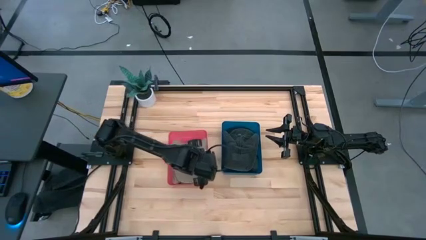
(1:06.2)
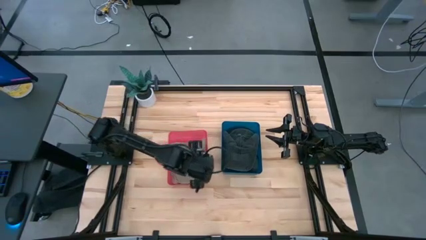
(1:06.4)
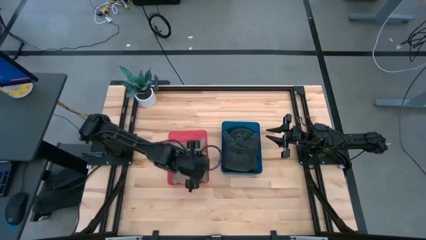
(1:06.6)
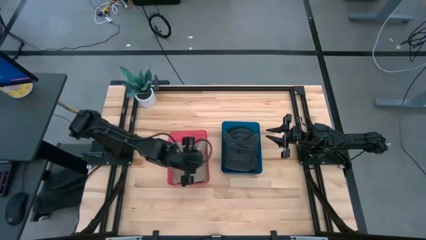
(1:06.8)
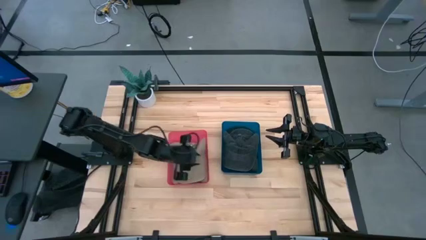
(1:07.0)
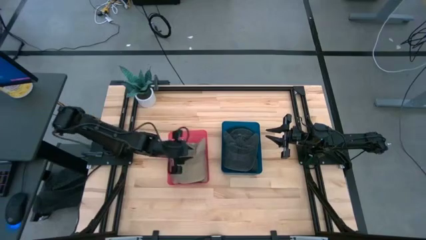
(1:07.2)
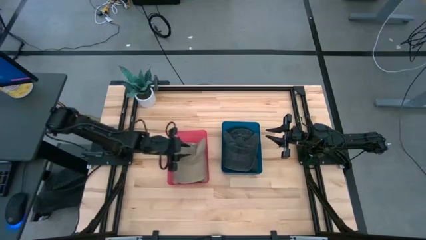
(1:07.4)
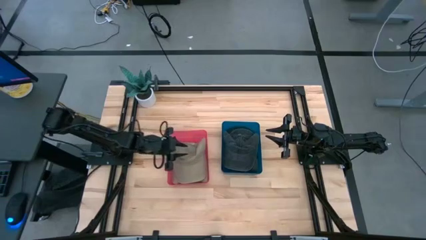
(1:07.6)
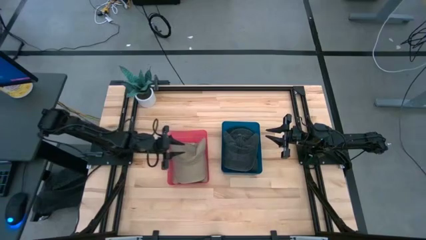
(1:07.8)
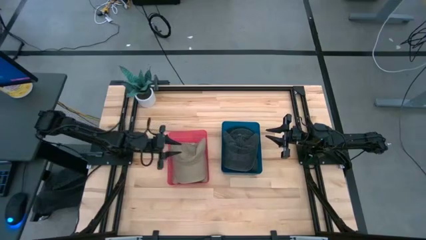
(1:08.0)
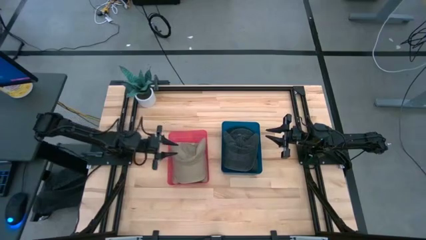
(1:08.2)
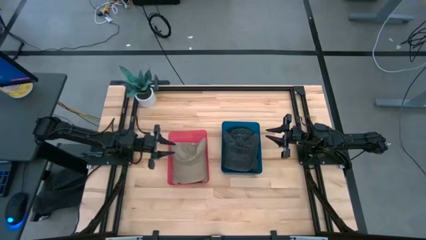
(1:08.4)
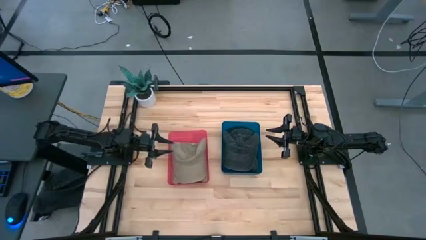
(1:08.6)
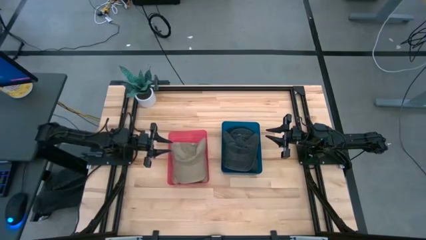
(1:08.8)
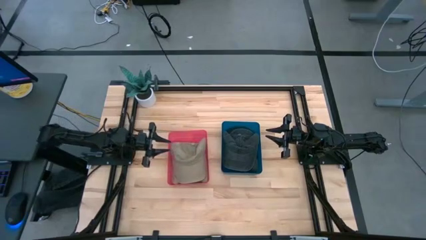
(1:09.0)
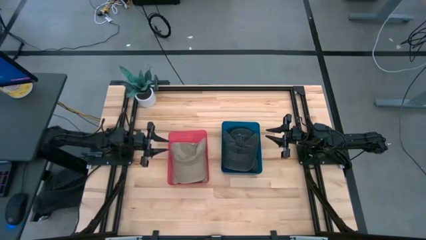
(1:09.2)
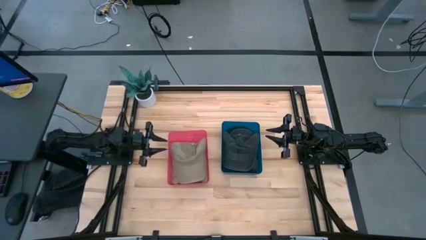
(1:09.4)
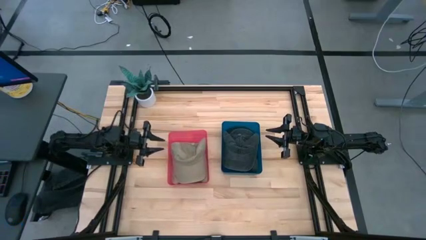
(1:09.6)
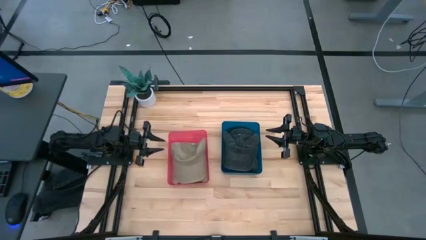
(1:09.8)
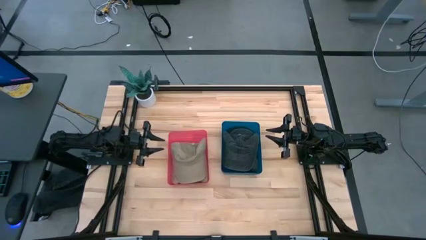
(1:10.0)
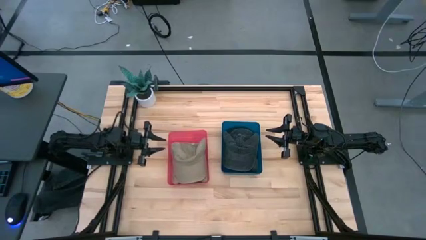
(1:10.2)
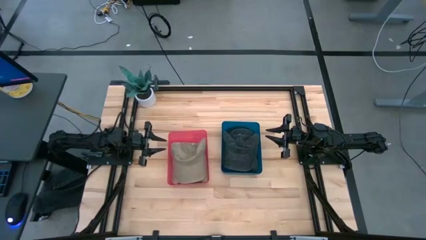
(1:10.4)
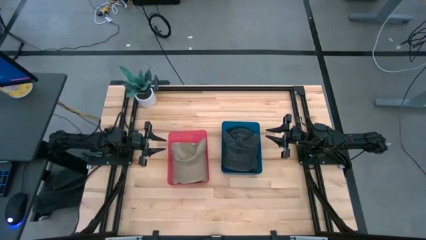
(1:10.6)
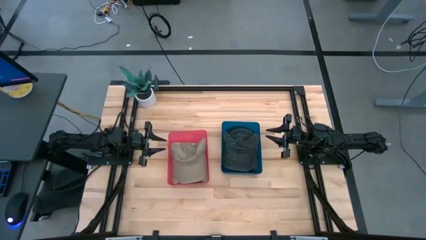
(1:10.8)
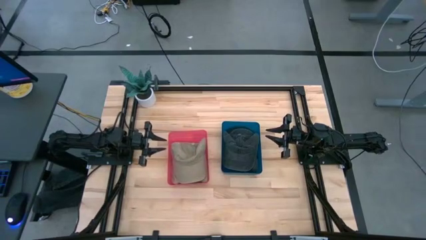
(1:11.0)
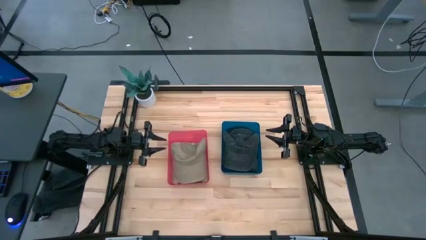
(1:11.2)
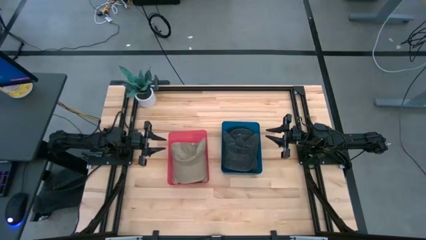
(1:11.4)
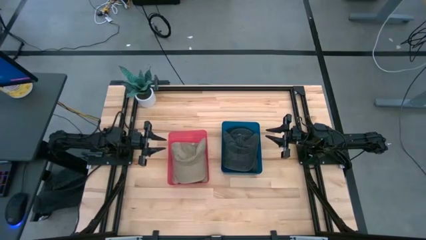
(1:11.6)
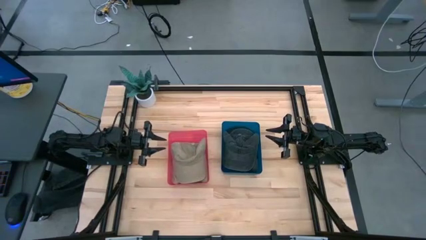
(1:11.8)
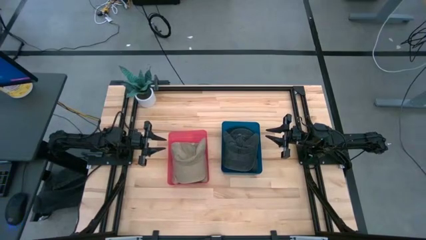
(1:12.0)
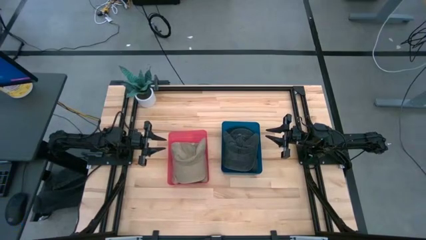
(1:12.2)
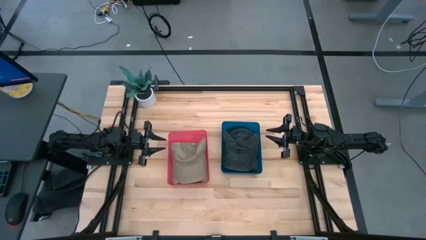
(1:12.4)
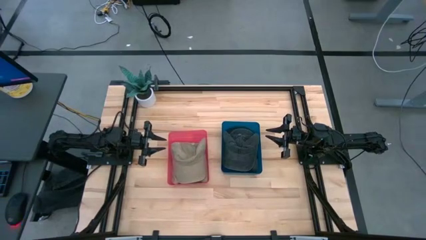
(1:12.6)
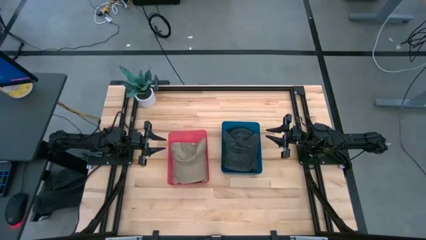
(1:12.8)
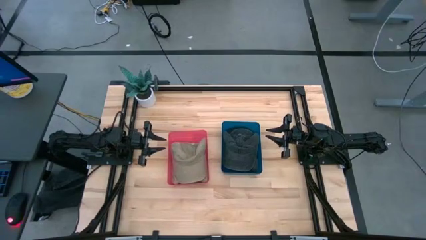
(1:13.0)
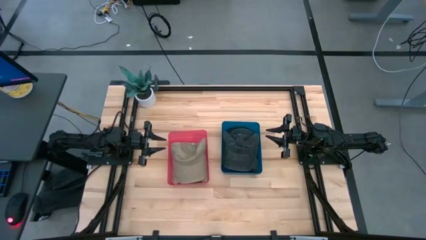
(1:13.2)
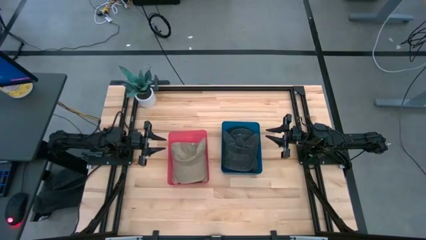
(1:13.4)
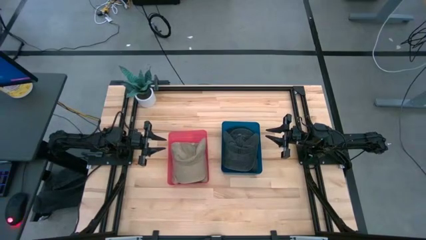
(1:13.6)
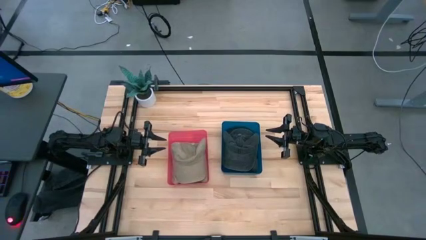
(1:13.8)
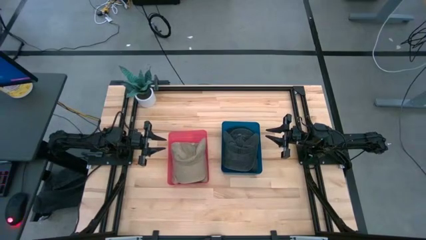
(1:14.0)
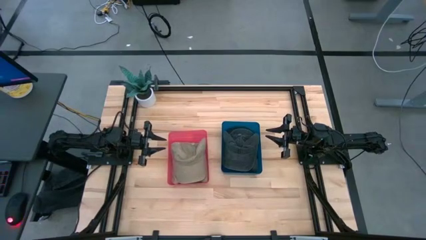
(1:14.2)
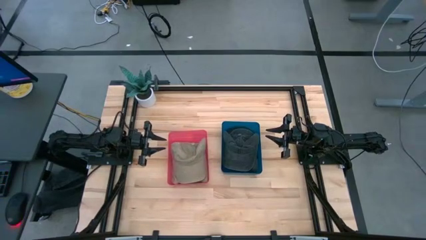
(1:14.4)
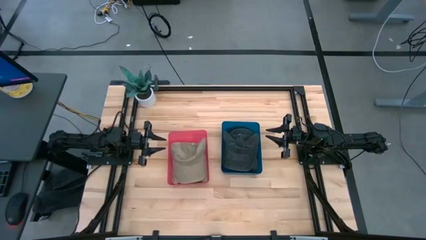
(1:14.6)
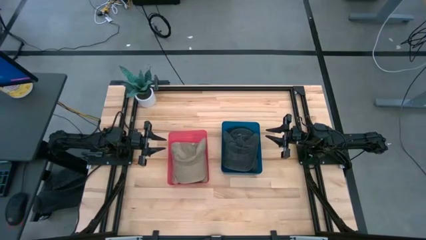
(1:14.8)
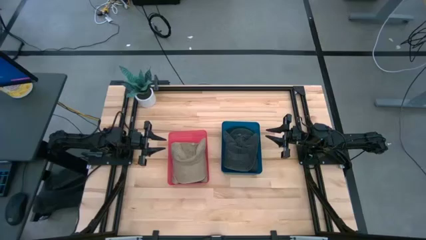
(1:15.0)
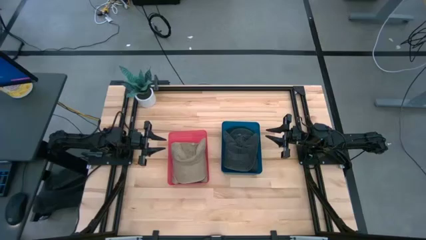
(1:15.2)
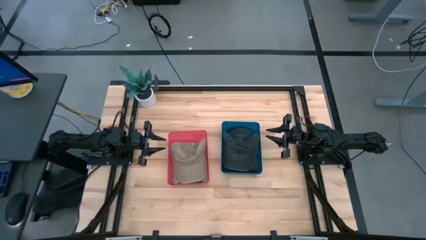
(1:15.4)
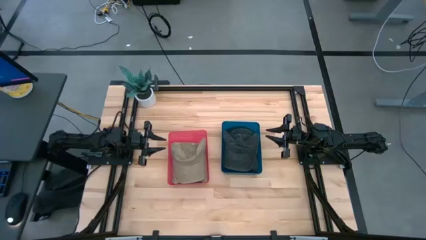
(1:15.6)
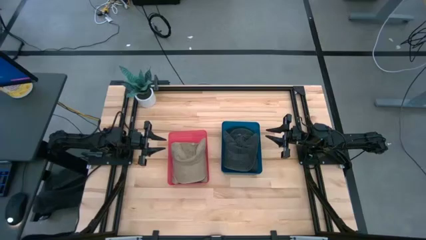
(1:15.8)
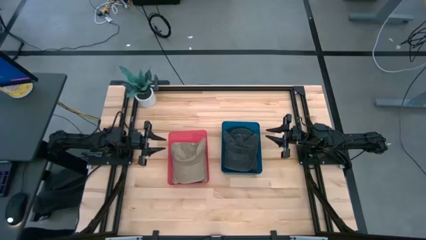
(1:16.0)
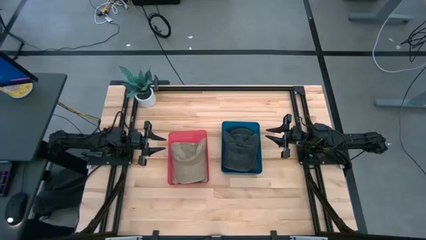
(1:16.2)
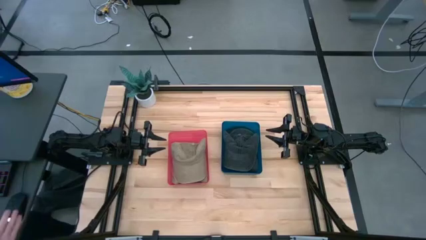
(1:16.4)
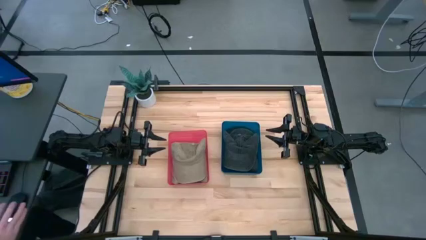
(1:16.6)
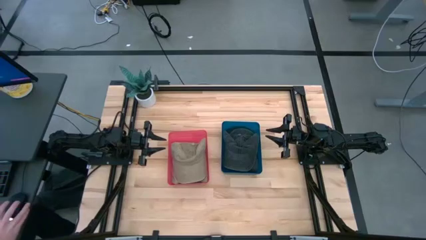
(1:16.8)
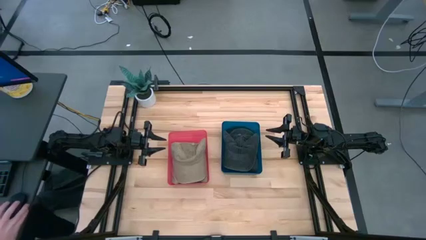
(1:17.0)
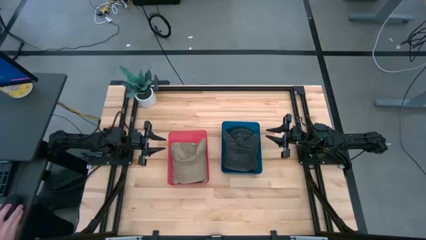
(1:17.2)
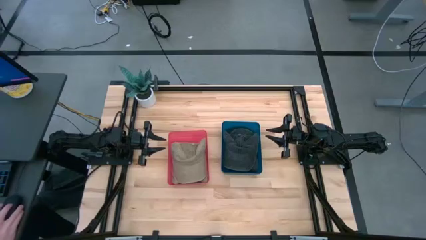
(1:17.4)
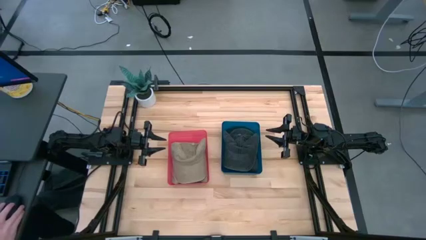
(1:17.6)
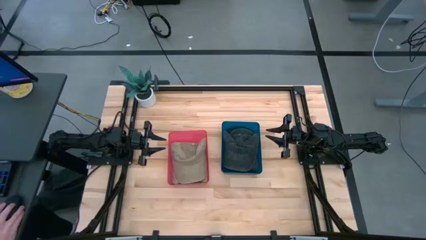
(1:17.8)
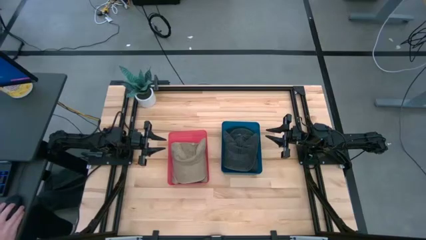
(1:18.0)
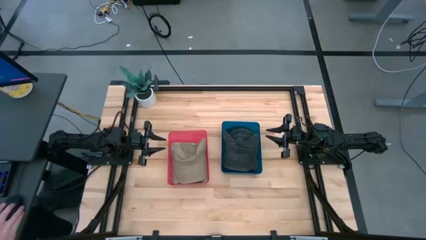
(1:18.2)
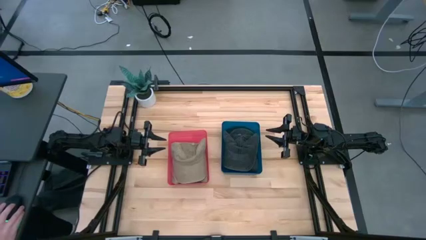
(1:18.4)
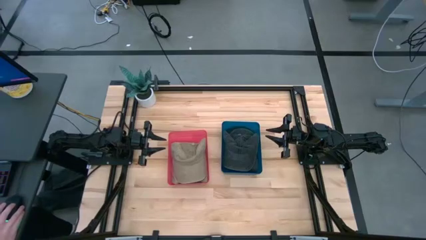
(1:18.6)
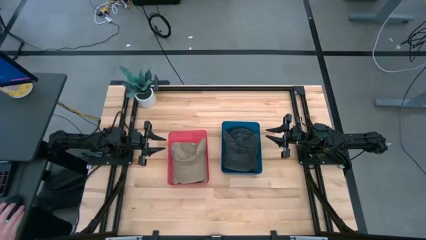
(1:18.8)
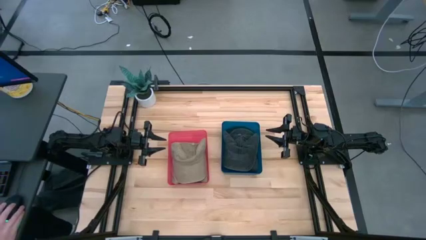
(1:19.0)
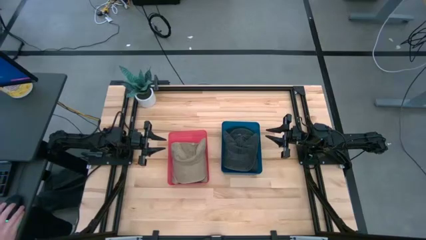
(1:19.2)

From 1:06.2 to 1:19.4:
Task: Pick & Place hat
Return to Home Position

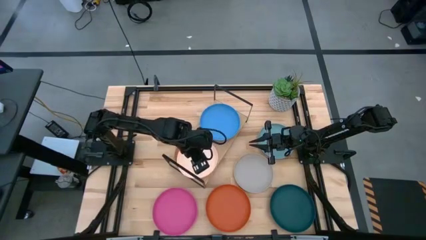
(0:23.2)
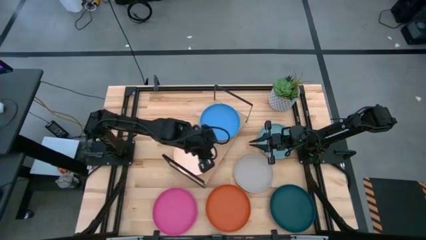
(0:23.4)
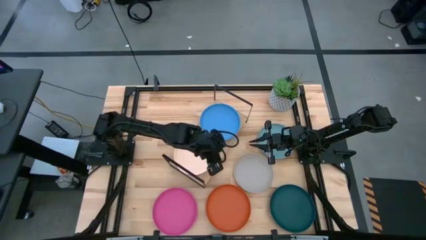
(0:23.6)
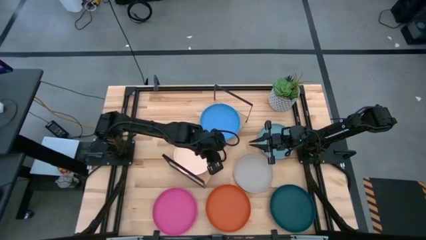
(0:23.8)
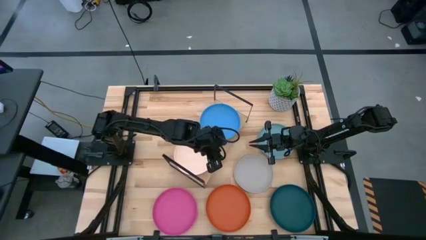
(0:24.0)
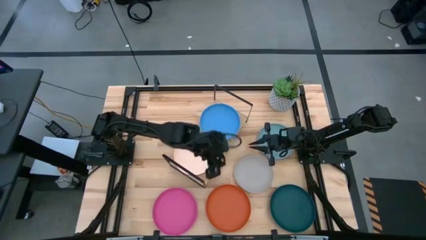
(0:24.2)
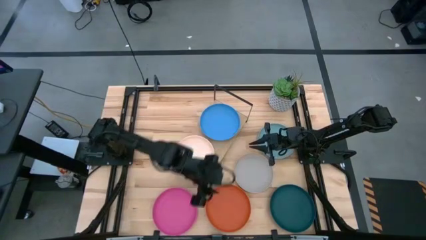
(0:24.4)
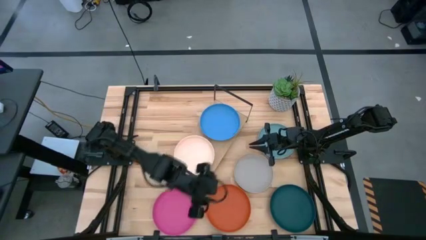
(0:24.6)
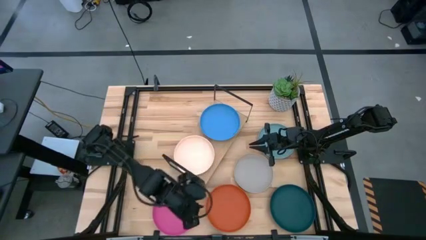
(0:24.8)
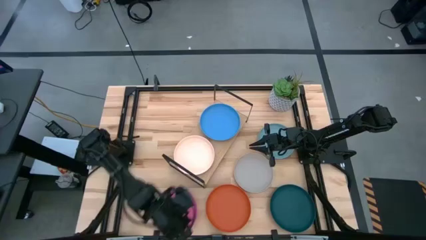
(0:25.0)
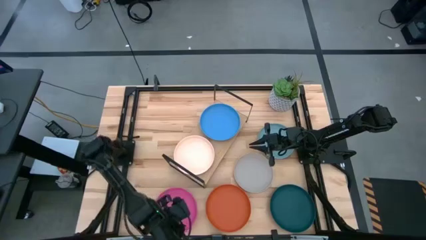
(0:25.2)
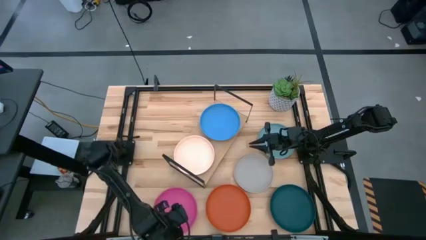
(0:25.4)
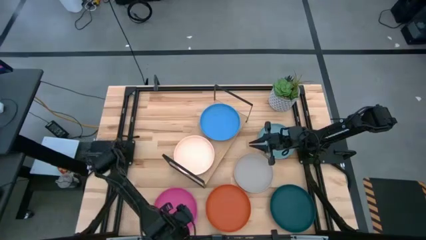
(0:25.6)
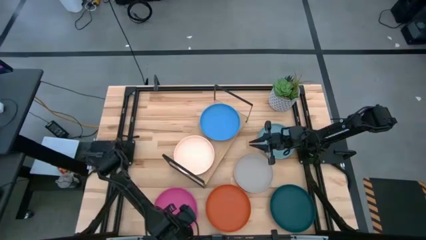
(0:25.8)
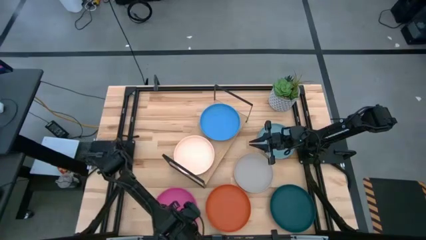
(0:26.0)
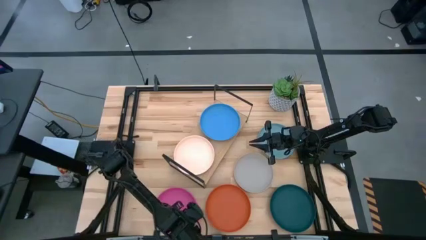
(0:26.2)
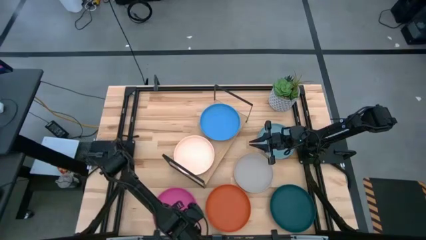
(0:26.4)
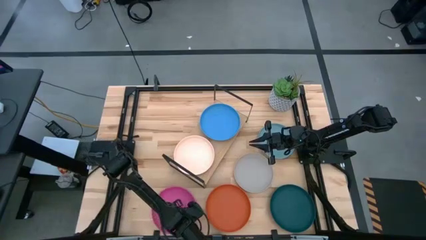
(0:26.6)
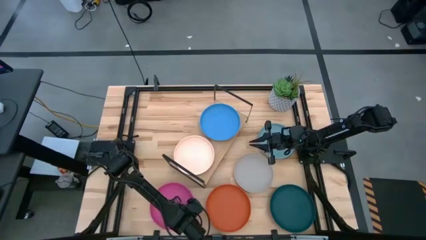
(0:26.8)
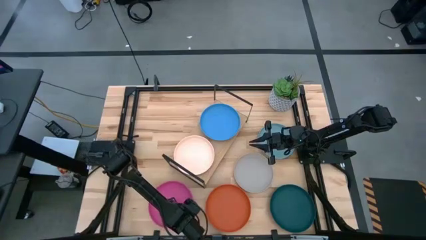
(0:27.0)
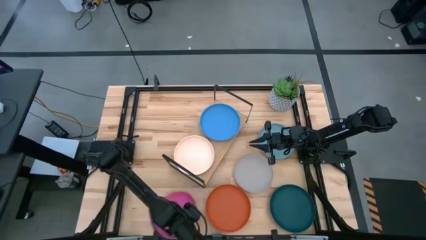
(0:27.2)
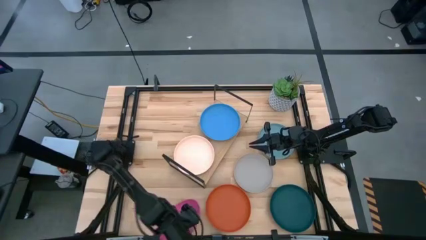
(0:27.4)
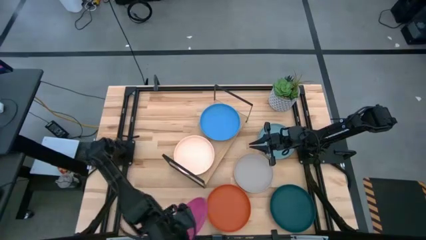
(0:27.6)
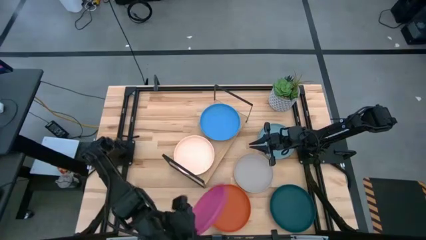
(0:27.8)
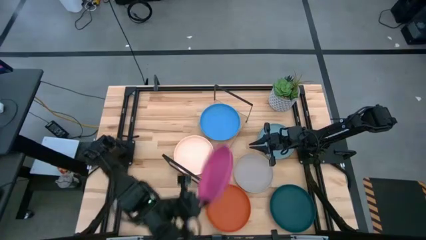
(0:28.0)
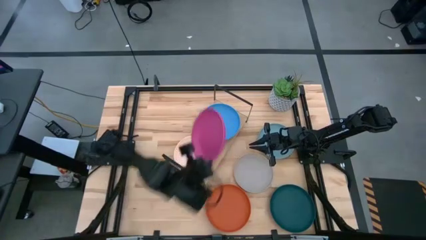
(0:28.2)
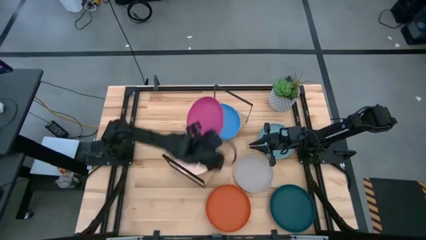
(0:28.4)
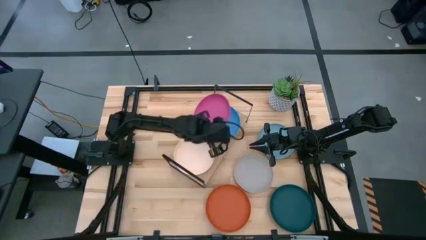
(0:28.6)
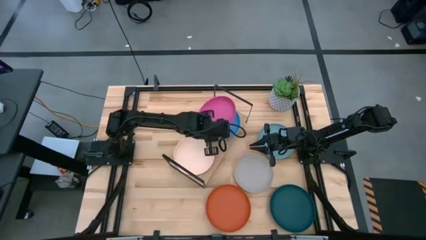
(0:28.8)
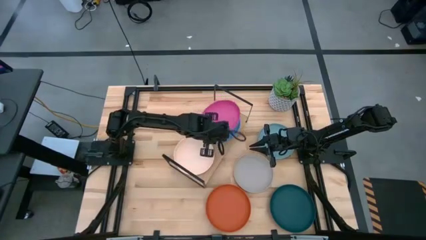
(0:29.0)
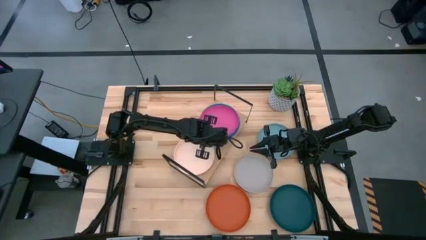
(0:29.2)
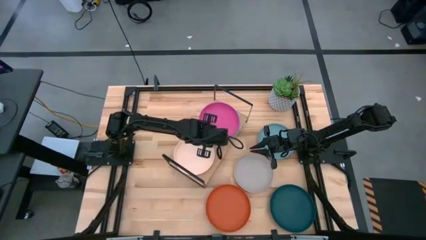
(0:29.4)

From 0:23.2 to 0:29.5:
Task: Place and stack plates onto a shelf
Stack the pink plate on top of the blue plate on the shelf
